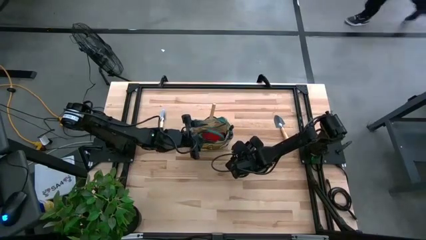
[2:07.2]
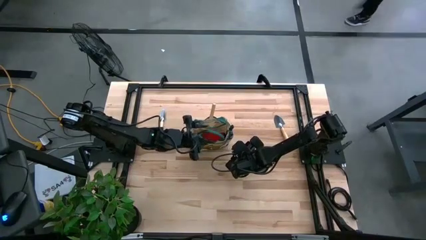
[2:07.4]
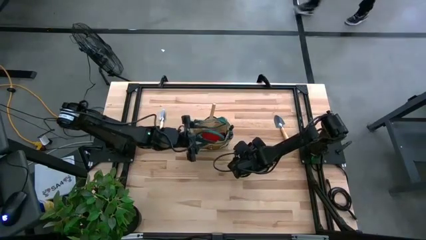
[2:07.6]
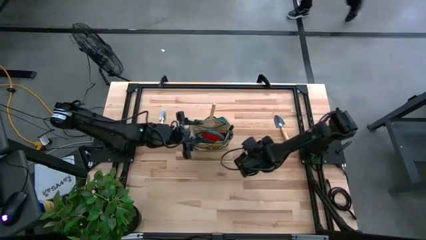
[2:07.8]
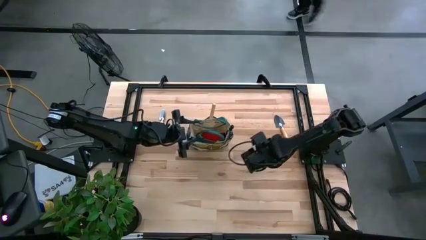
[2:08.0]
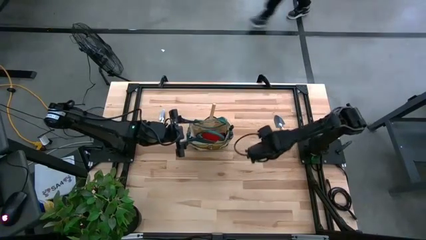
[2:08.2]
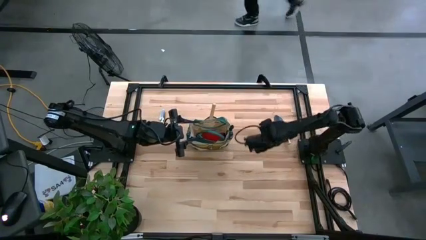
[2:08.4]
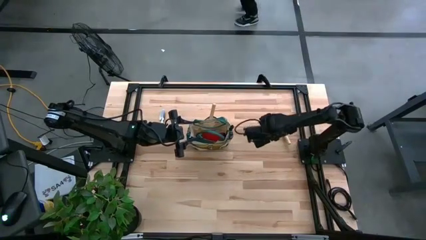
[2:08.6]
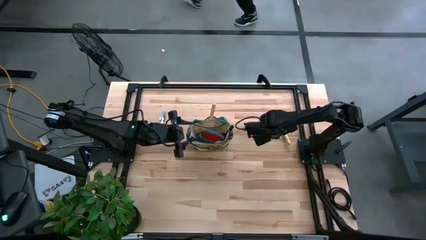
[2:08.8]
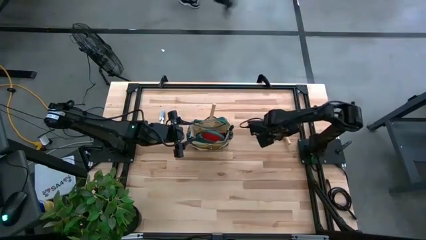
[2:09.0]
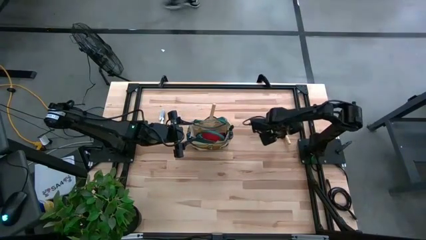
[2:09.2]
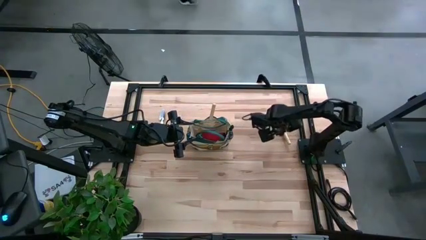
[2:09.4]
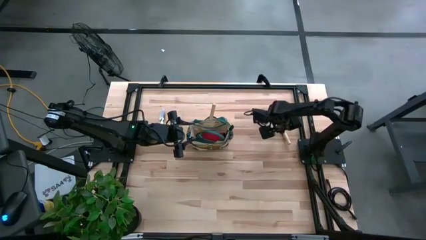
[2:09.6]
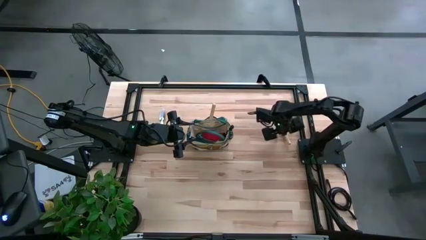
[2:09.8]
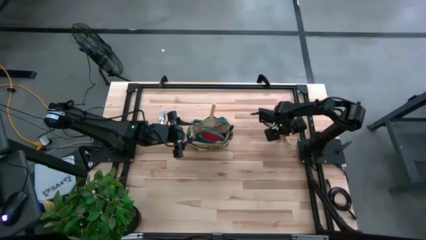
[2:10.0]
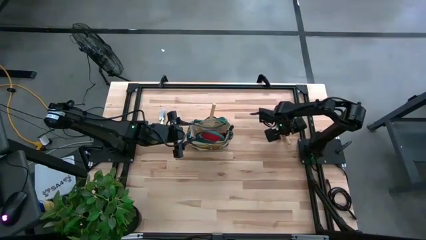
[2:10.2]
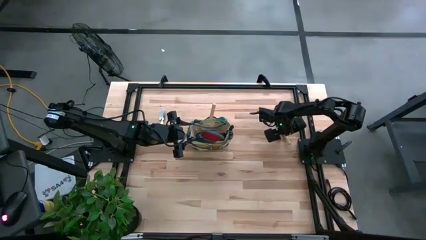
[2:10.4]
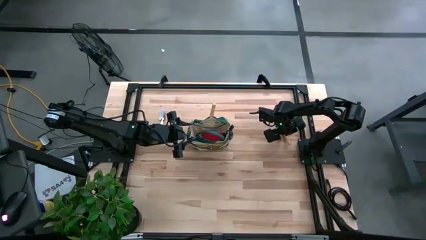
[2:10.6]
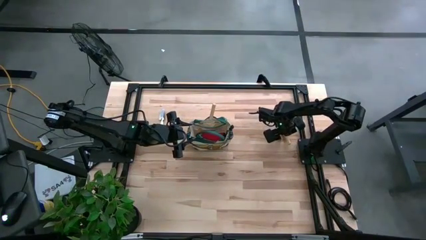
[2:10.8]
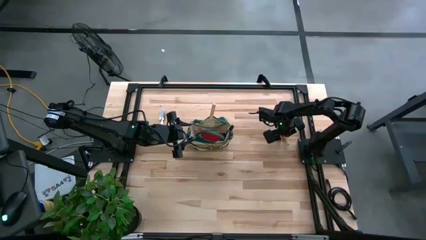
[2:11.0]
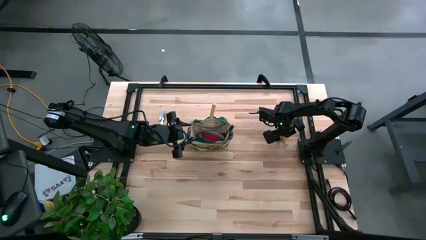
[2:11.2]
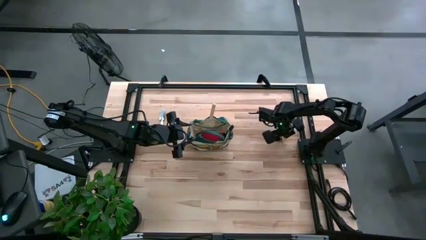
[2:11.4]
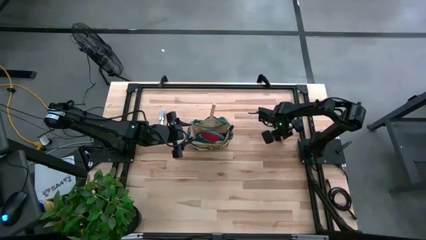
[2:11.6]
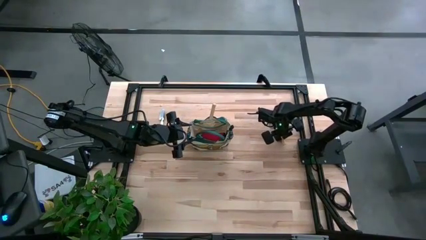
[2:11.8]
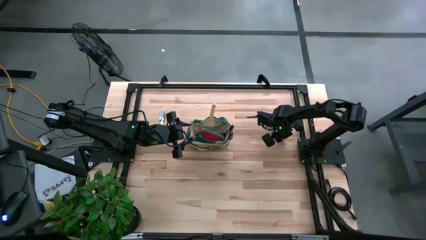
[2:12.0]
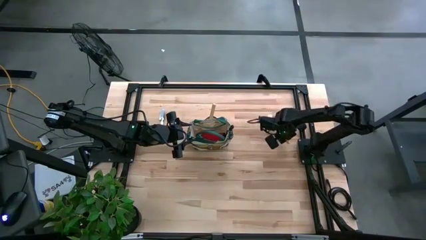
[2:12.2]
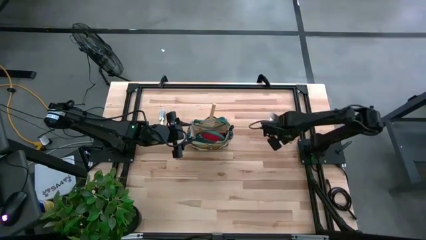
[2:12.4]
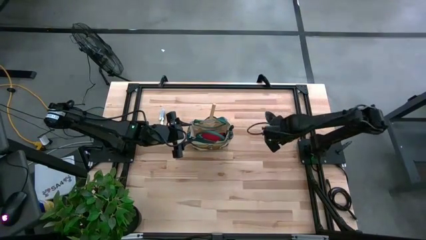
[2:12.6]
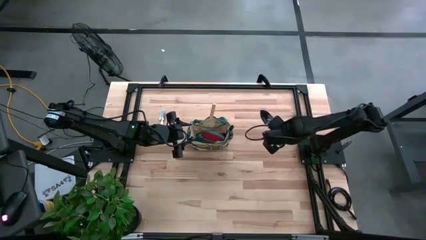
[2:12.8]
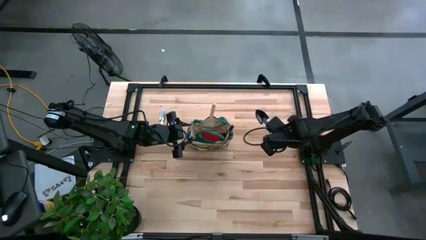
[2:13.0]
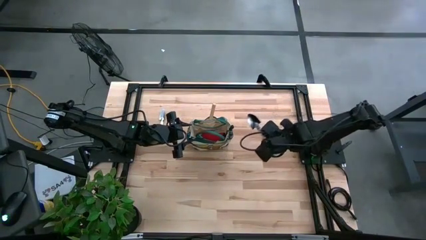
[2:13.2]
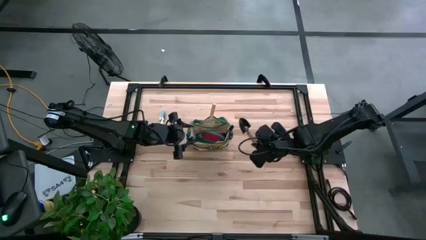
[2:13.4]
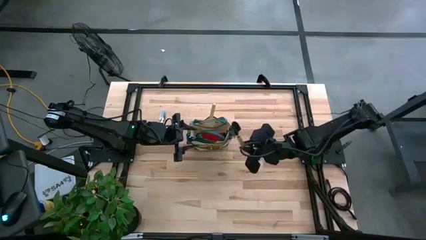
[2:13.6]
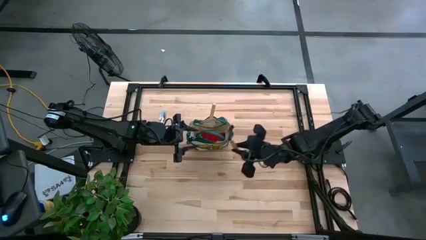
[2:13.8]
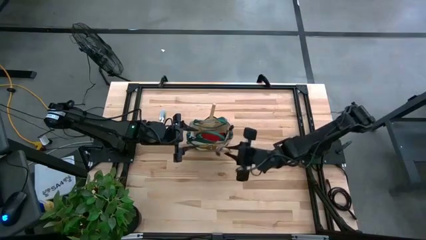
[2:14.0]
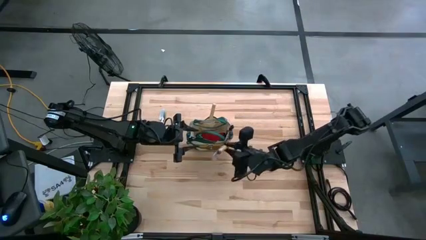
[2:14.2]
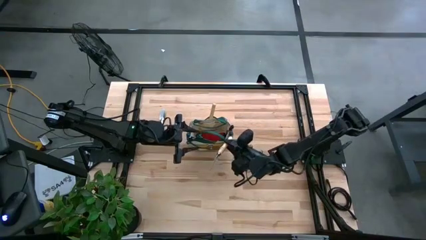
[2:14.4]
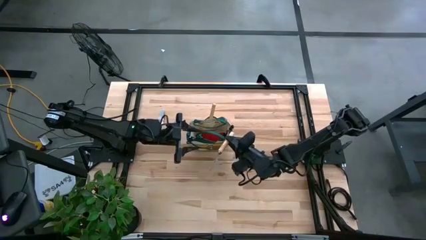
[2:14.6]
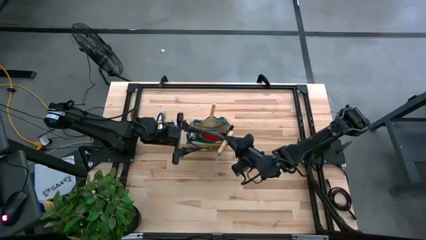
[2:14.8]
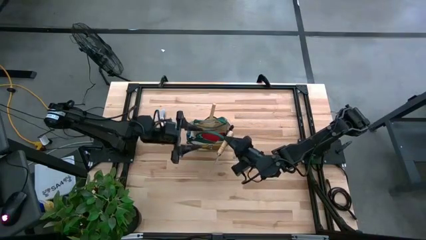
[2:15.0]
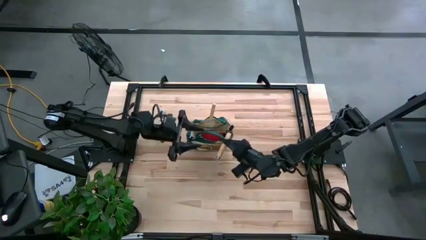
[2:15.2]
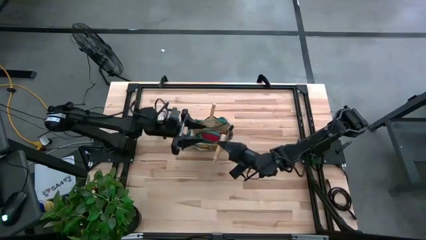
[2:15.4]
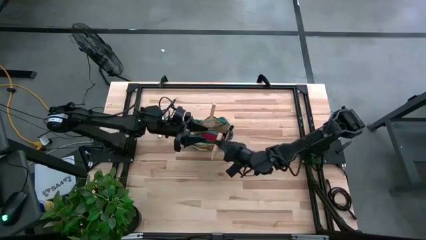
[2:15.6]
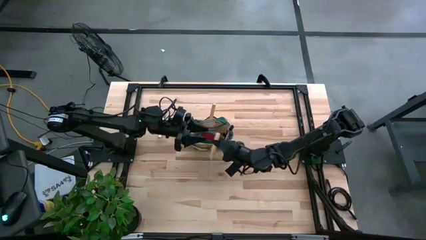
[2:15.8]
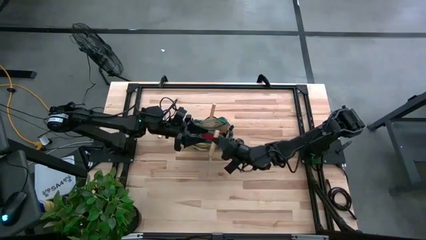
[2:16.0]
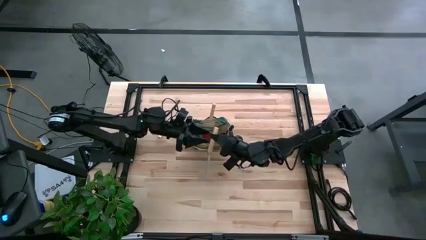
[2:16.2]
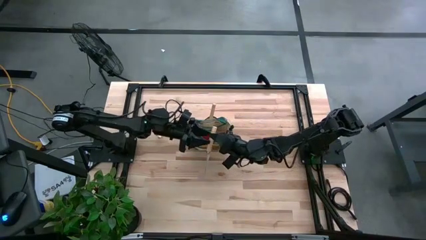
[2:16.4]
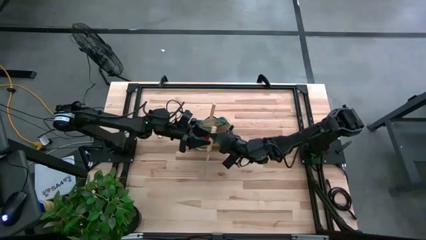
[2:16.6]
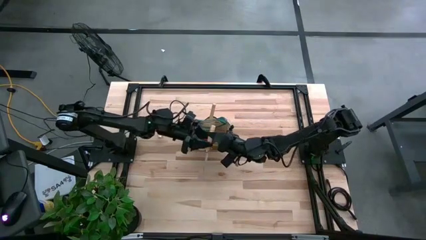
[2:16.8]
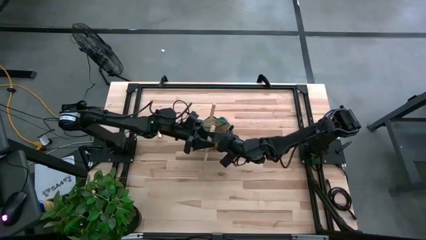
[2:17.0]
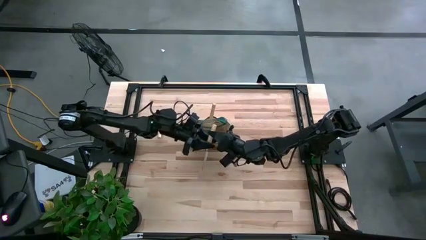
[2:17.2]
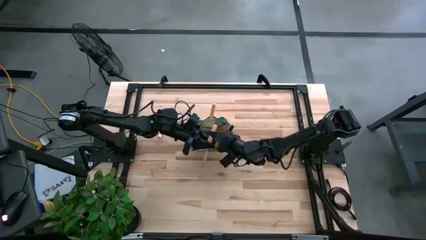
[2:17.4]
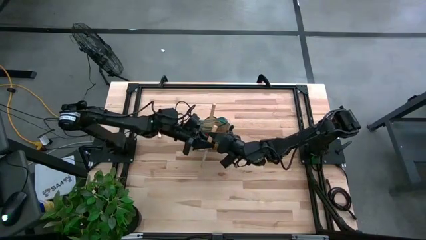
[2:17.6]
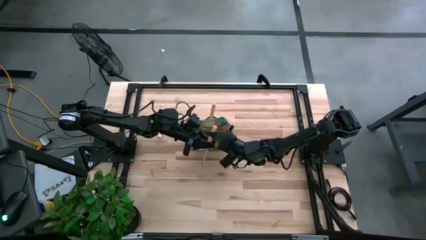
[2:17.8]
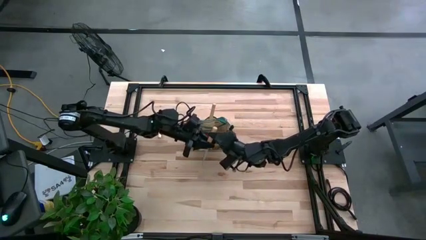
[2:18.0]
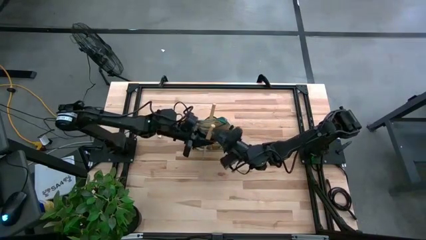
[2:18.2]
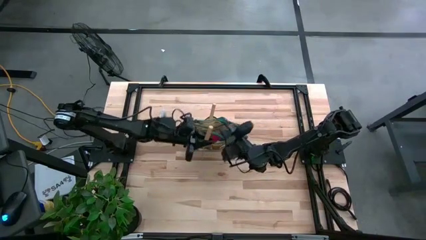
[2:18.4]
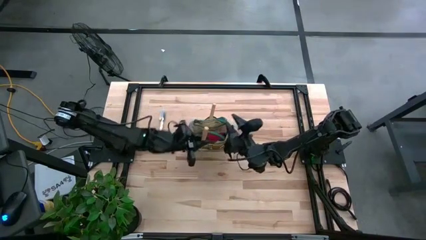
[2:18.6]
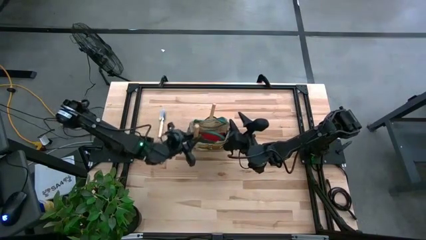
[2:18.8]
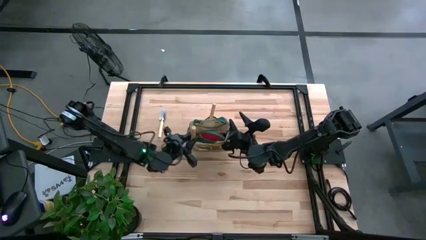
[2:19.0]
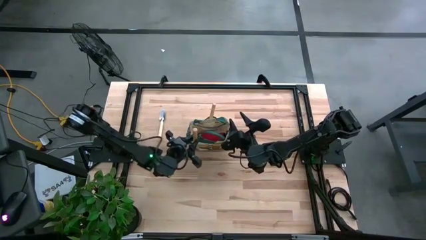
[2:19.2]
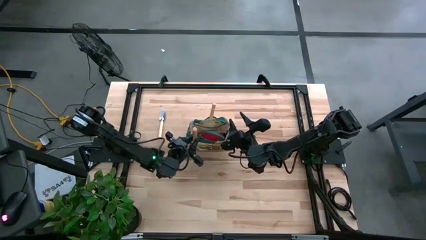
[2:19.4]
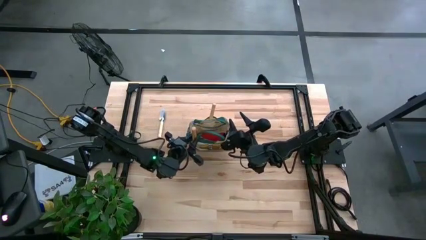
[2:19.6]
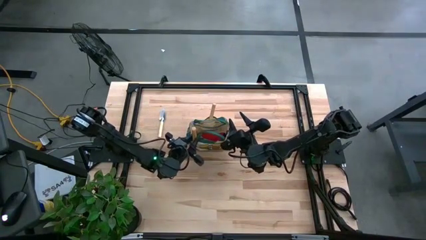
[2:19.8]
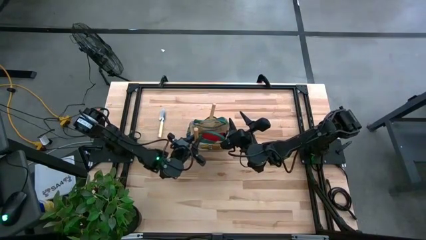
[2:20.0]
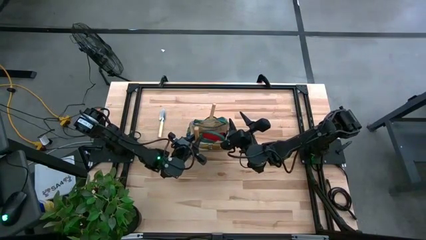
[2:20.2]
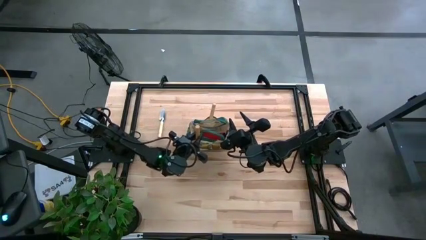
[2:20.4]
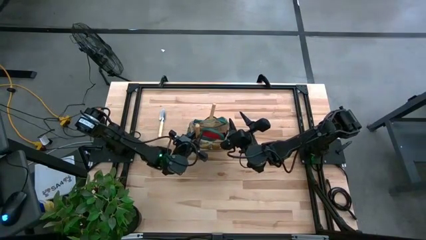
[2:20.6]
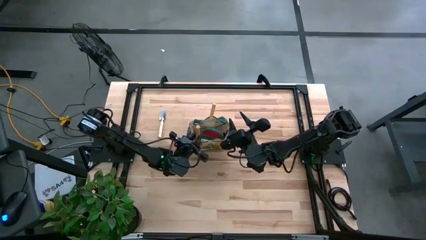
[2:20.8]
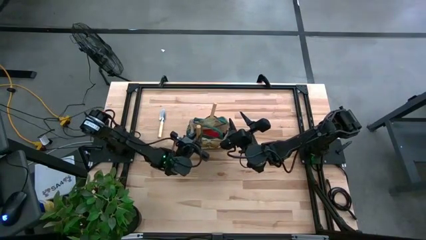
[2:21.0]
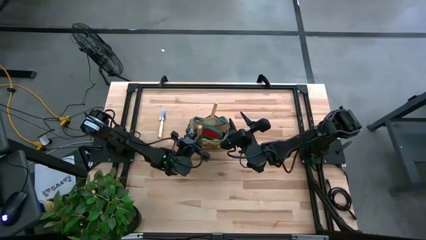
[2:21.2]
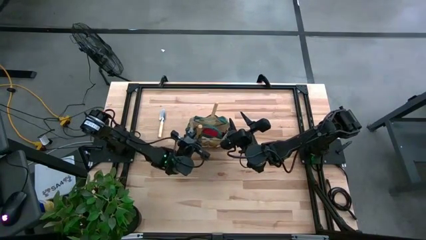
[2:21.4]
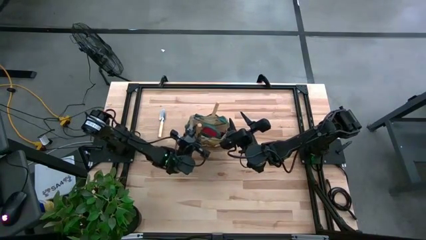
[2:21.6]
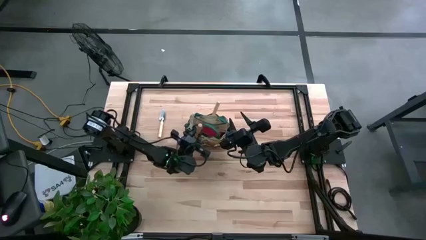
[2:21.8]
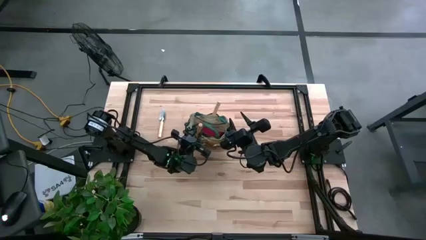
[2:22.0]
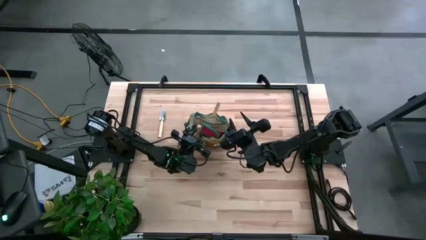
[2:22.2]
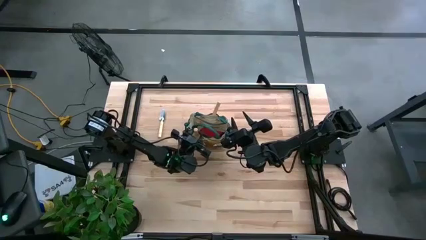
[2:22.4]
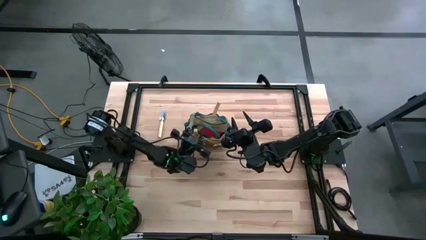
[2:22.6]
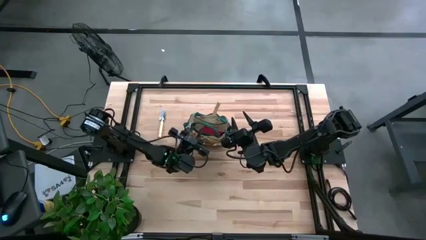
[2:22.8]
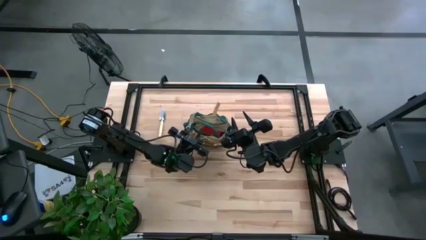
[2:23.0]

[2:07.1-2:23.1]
Task: Pick & Place Garden tools in Gardening bag
Put the right light brown trowel into the light brown gardening bag

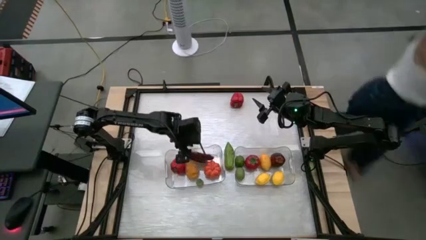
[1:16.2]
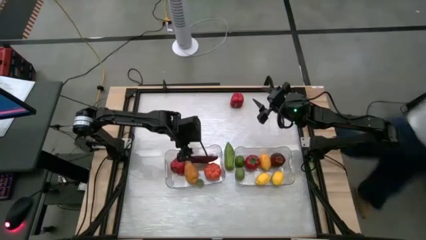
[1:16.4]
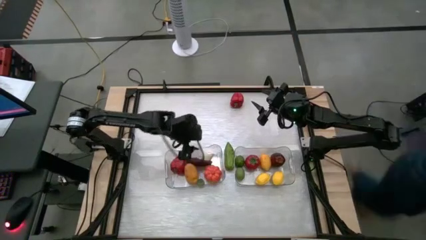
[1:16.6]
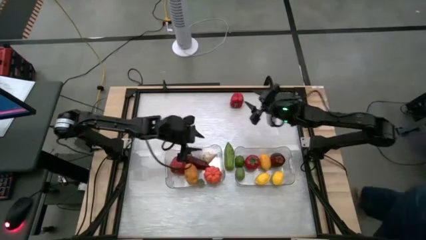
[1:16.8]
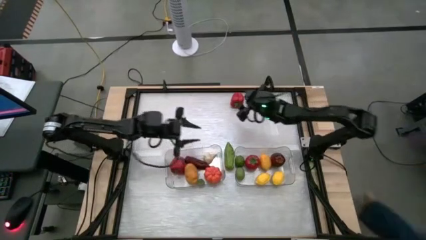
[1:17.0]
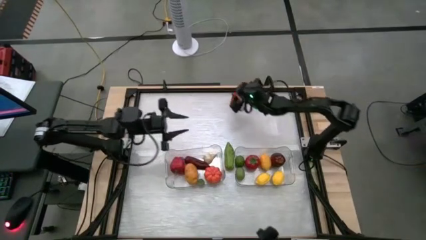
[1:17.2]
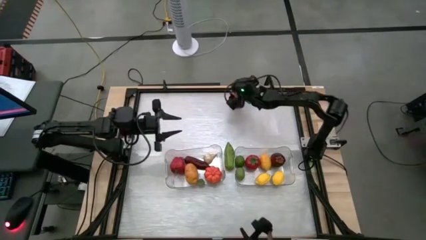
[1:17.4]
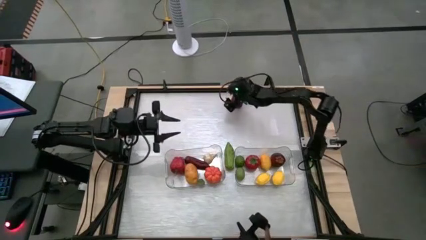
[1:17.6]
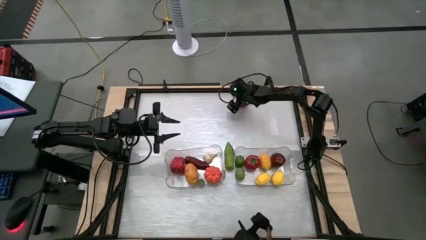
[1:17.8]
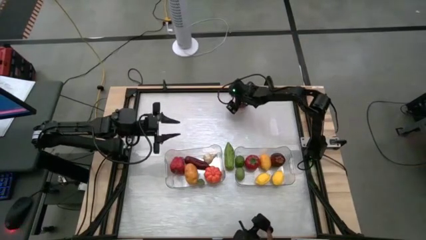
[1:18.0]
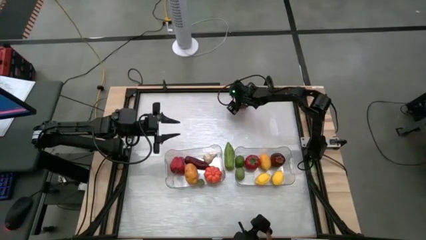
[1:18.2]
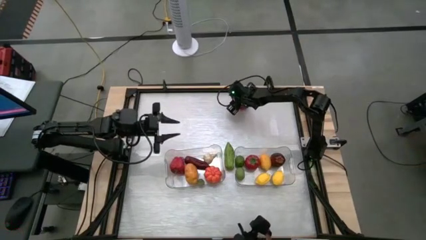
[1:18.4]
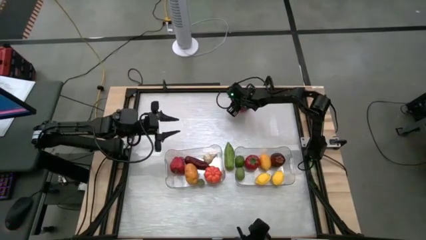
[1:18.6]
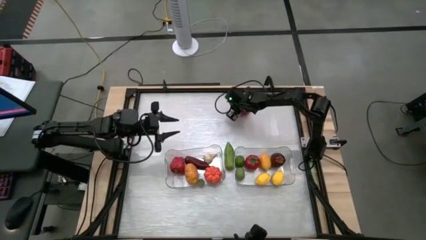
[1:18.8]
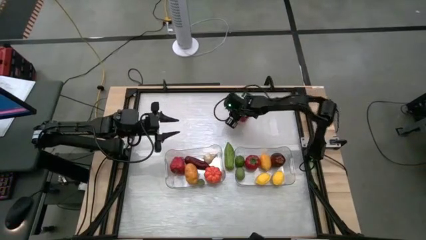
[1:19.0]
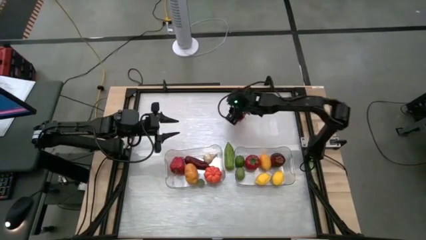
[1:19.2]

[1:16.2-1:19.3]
Task: Sort produce into baskets
Put the red bell pepper into the left transparent bin
